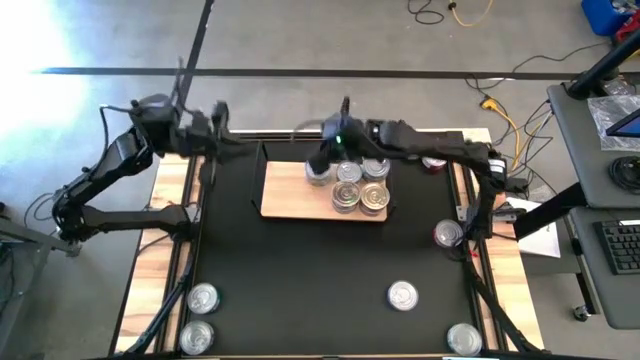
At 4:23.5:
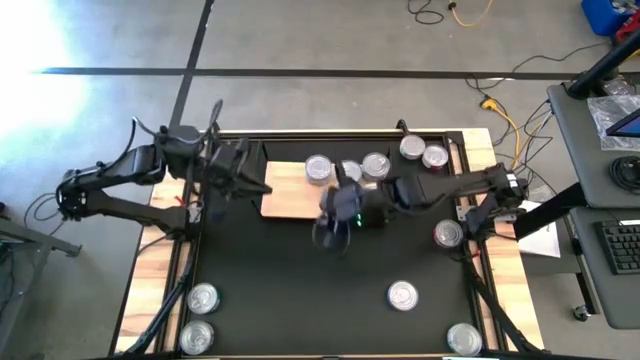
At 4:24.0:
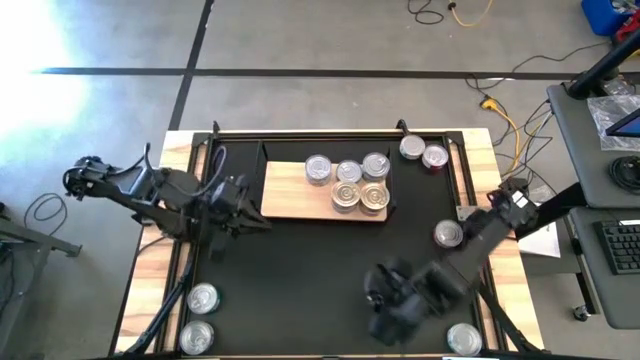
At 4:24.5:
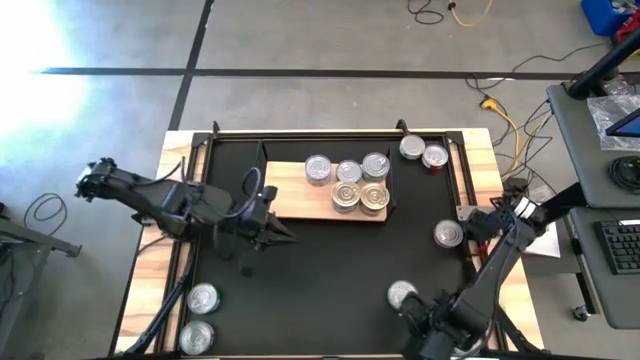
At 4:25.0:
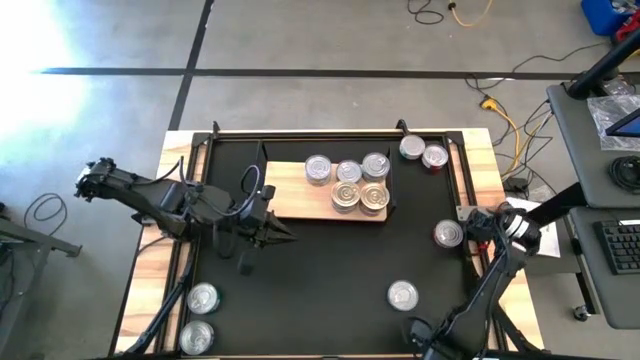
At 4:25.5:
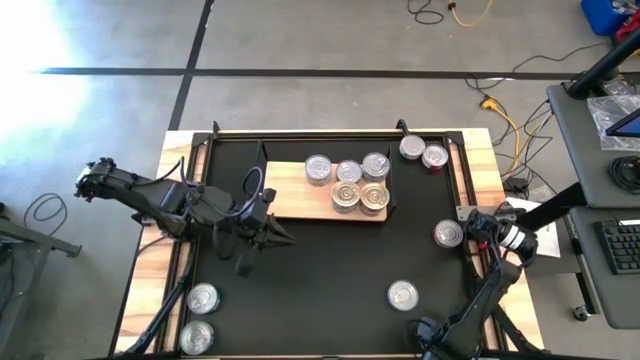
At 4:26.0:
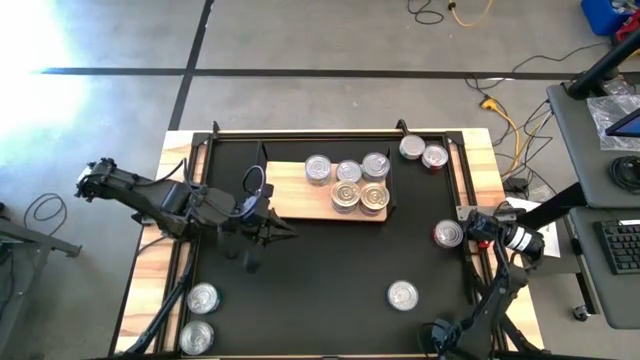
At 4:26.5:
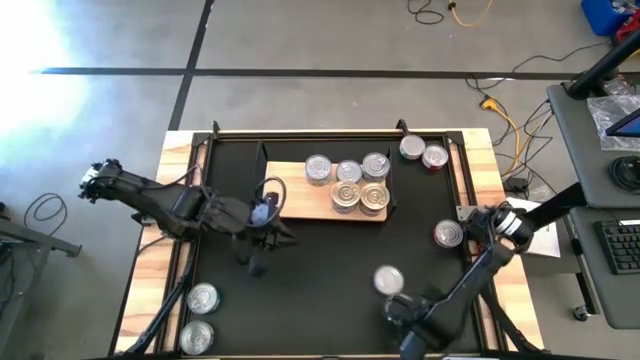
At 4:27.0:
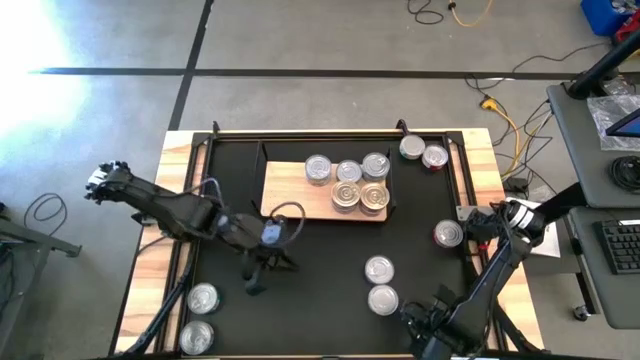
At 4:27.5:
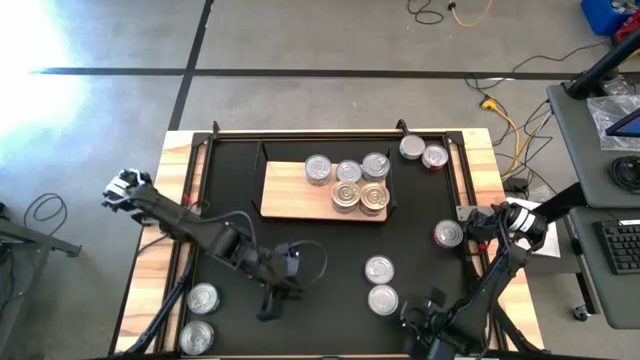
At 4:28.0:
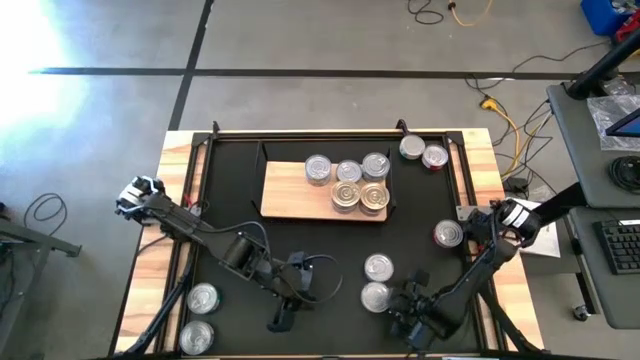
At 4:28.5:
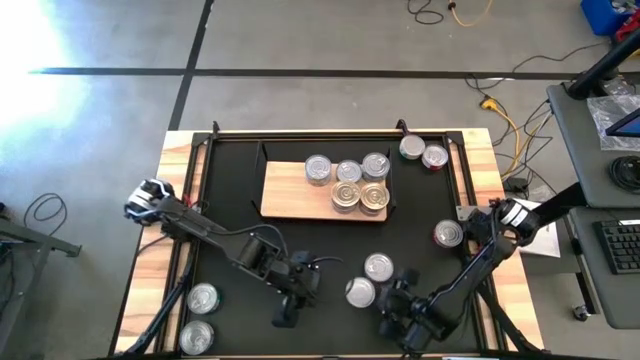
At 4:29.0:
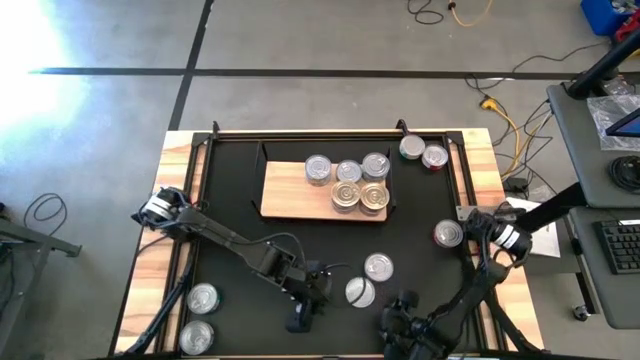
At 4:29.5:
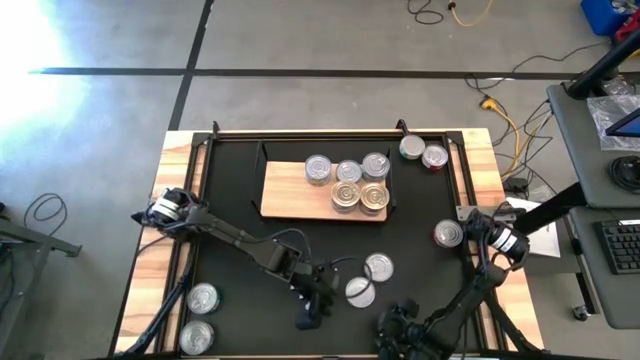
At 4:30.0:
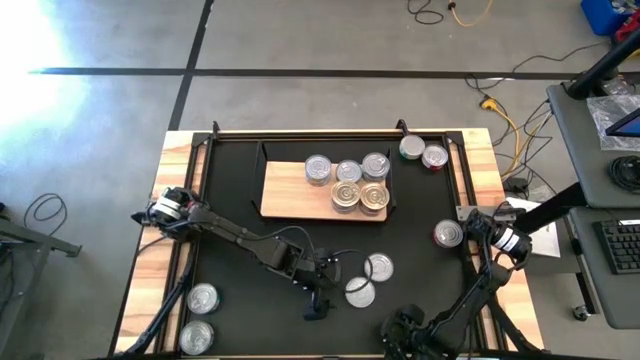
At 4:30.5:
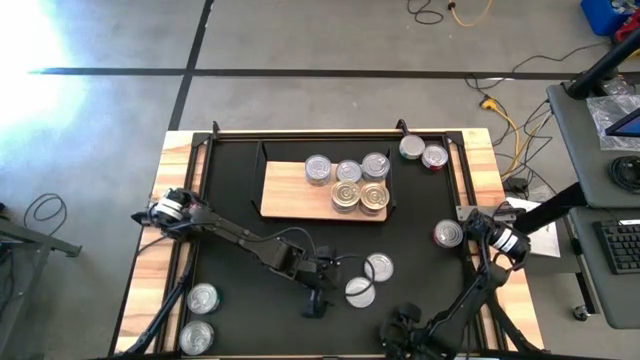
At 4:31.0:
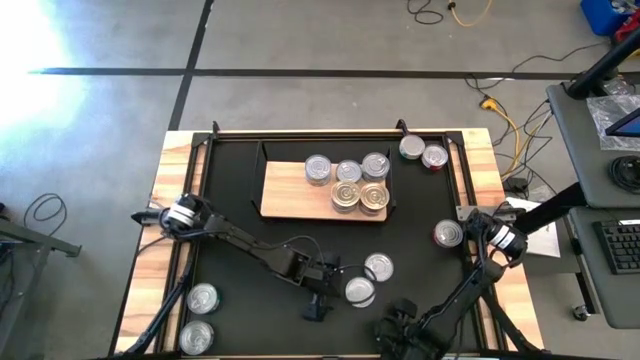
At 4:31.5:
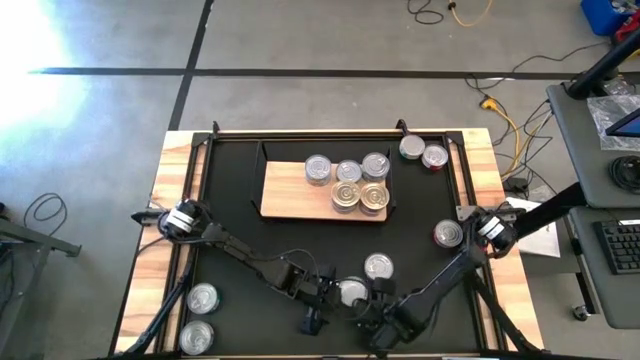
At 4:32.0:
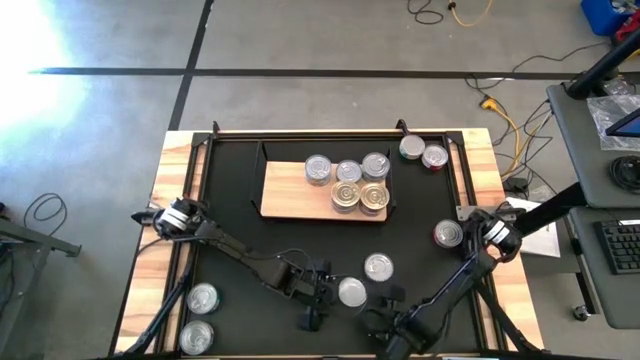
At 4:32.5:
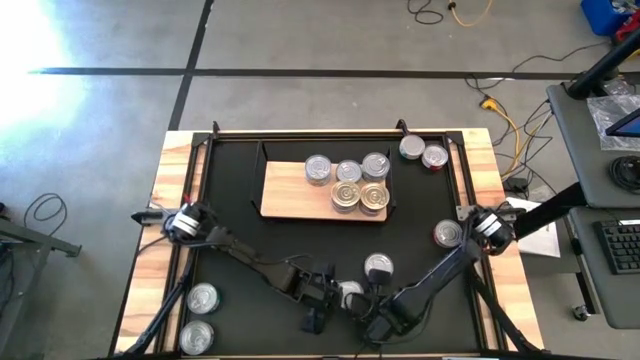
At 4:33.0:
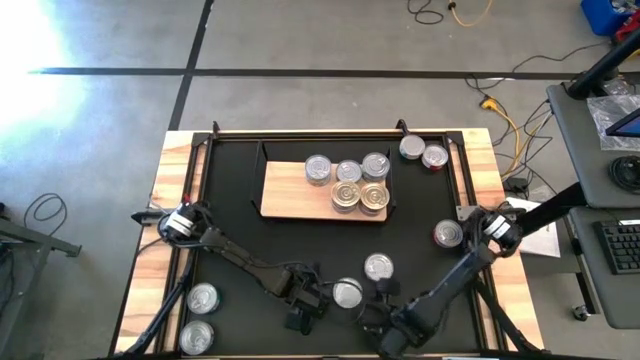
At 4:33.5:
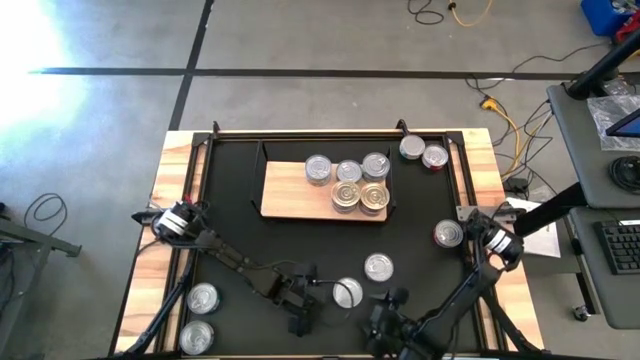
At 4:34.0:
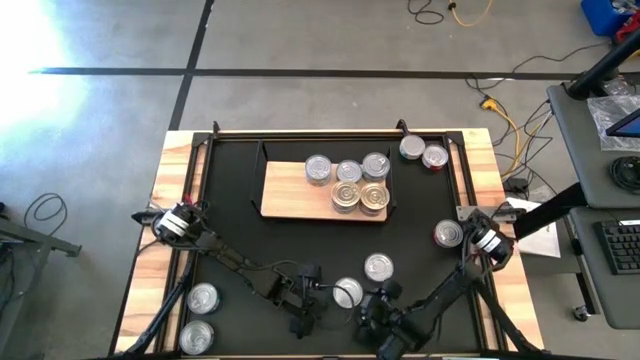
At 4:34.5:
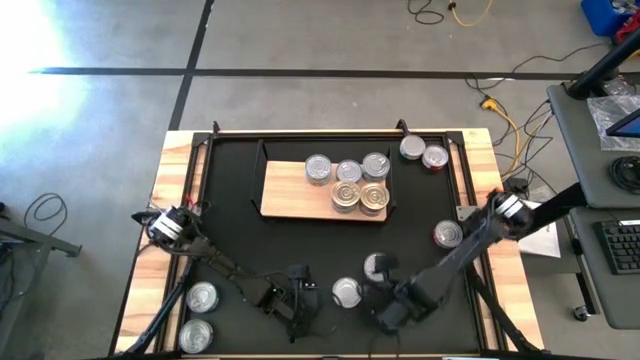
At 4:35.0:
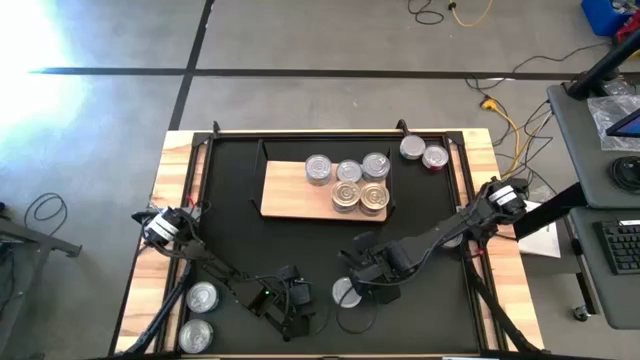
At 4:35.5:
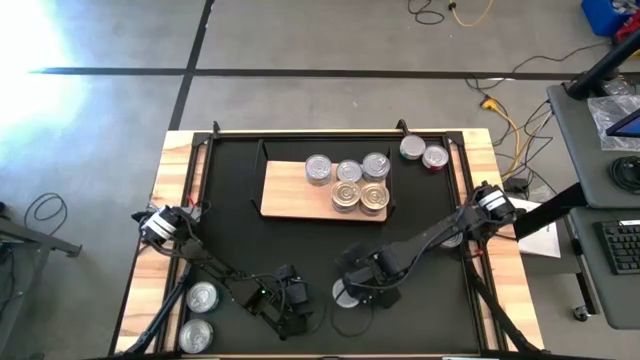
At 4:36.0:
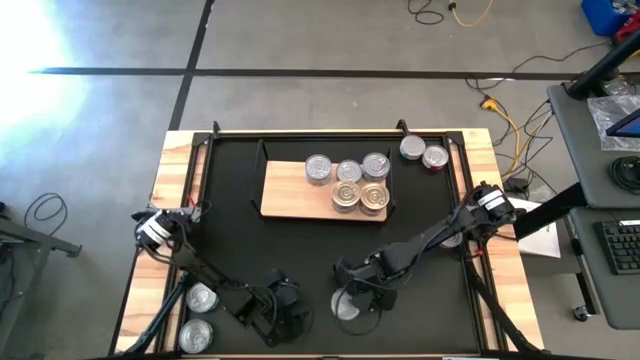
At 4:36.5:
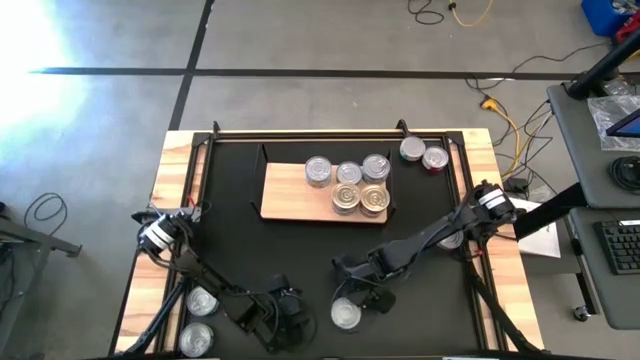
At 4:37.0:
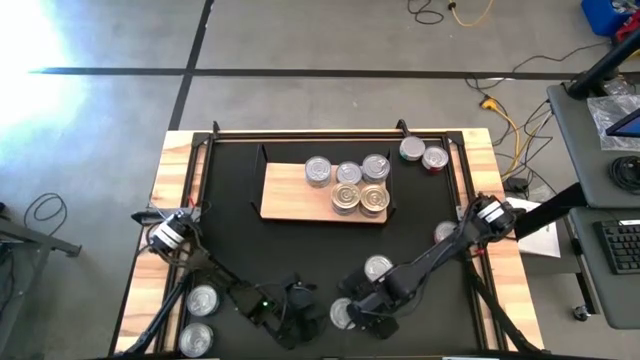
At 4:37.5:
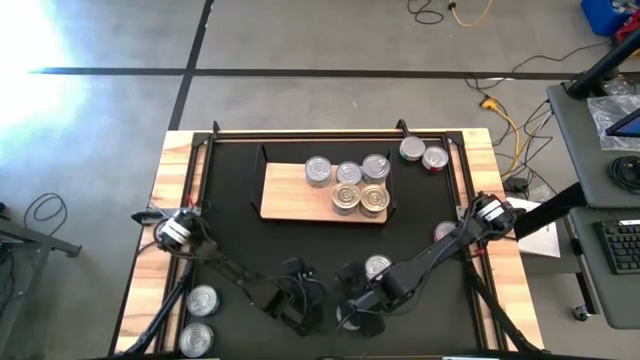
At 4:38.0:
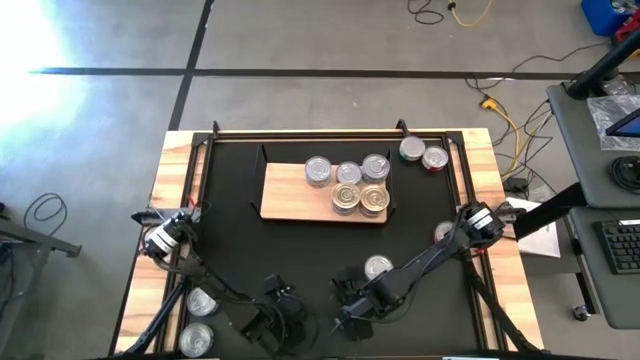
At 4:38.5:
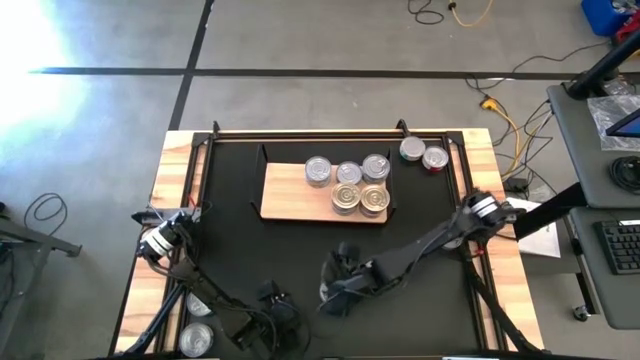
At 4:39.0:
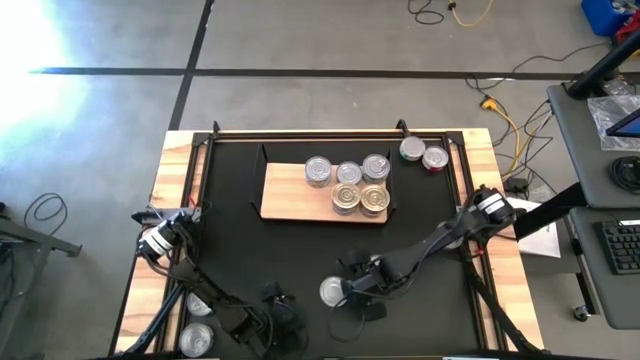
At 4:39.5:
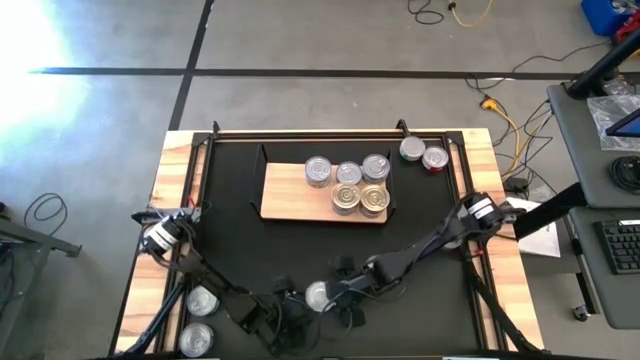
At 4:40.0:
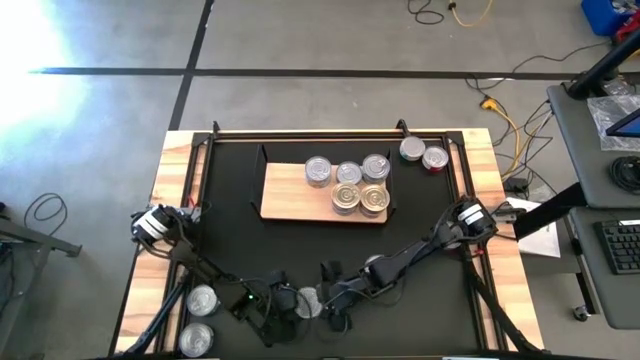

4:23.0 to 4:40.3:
Task: Stack canned seafood by type on shelf
Put the bottom right green and white tuna can on the shelf

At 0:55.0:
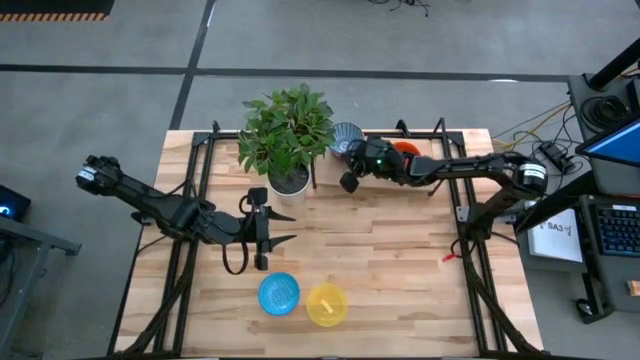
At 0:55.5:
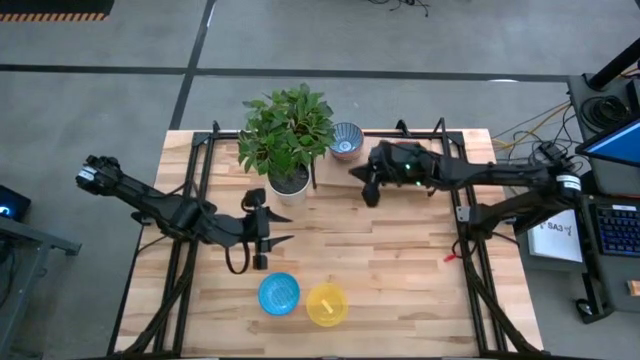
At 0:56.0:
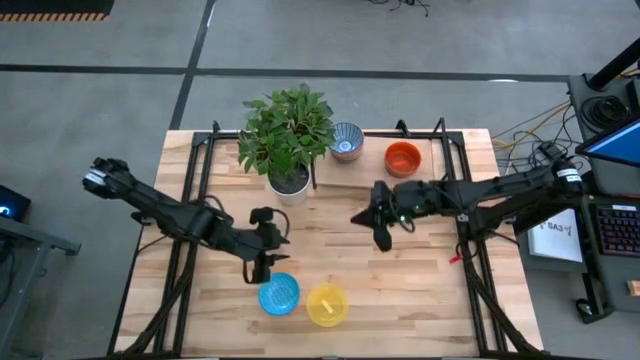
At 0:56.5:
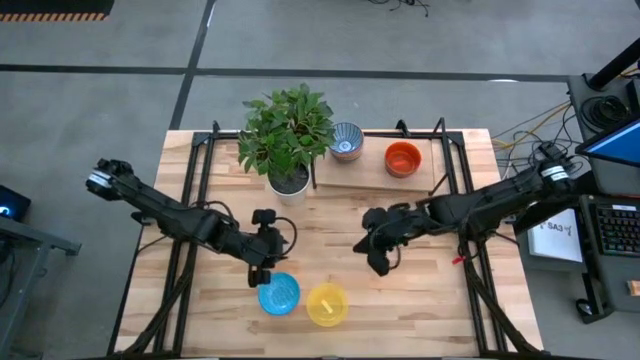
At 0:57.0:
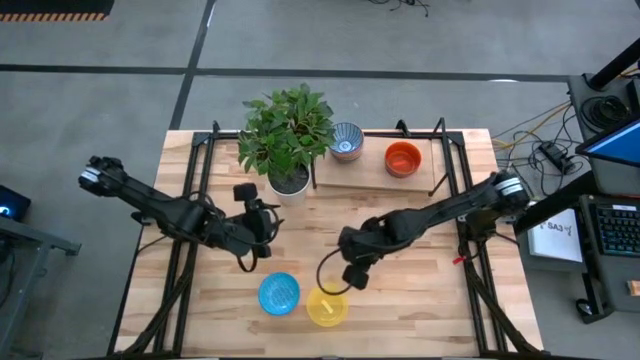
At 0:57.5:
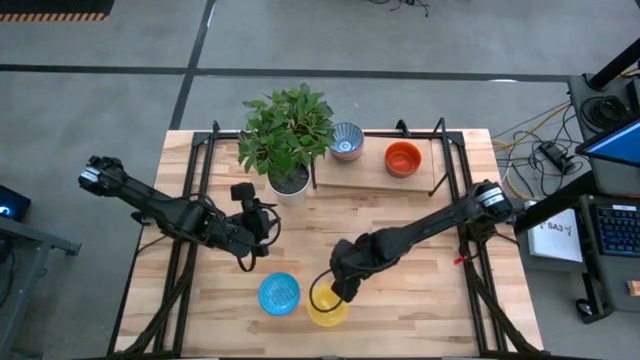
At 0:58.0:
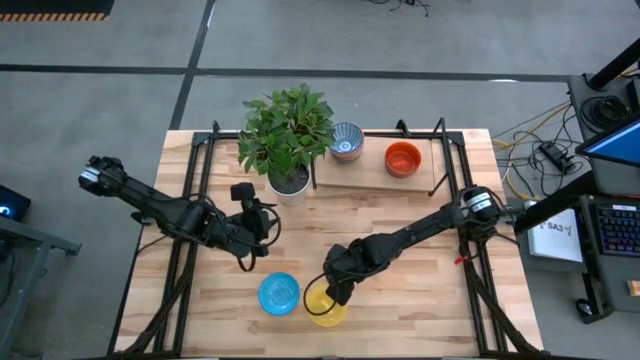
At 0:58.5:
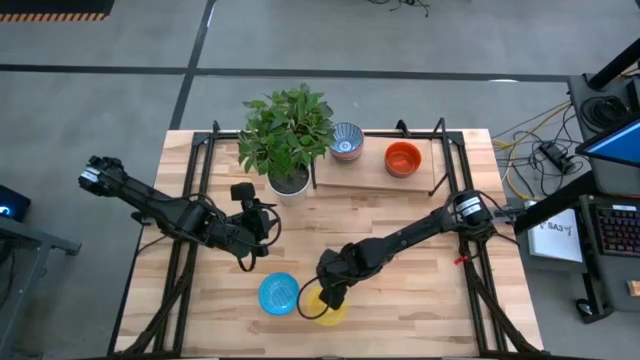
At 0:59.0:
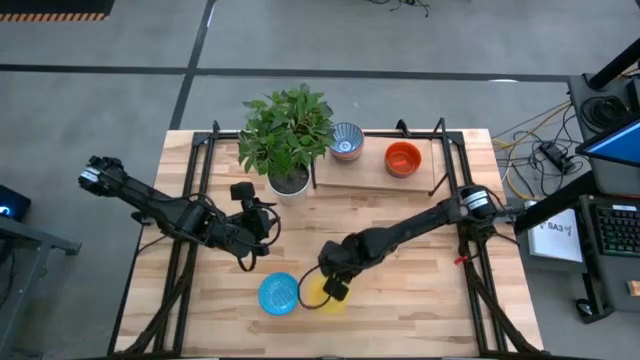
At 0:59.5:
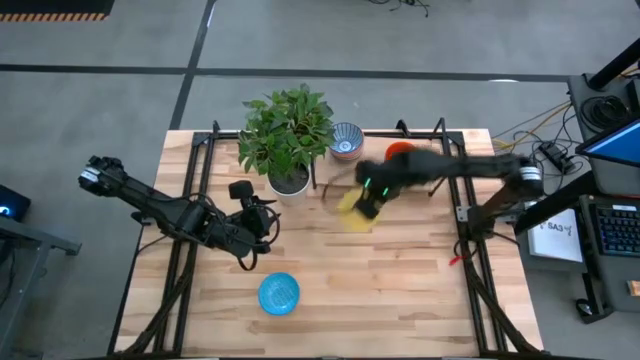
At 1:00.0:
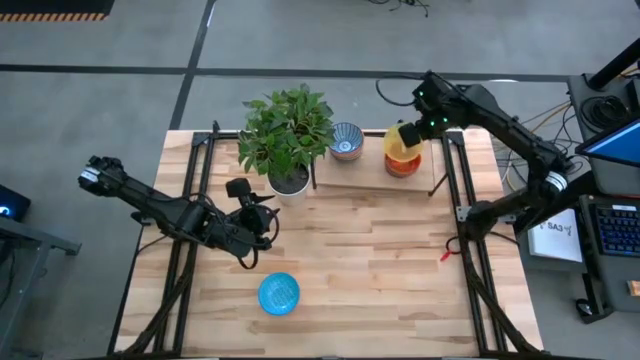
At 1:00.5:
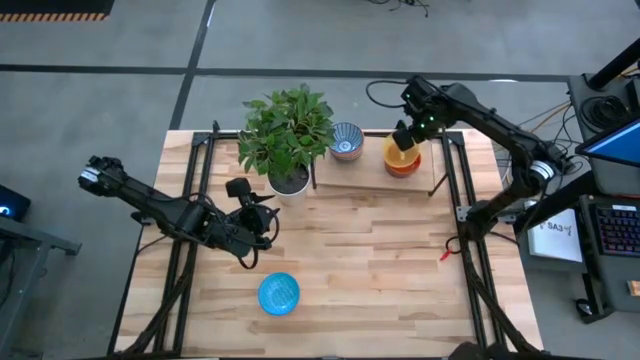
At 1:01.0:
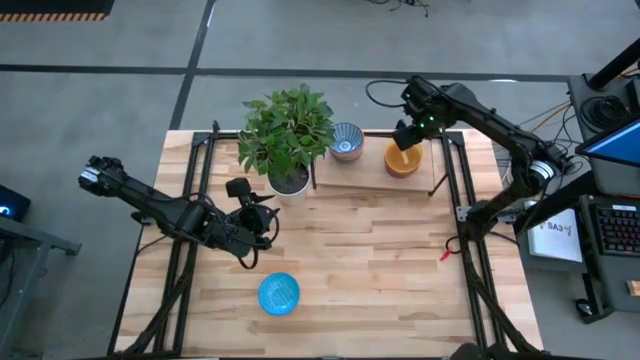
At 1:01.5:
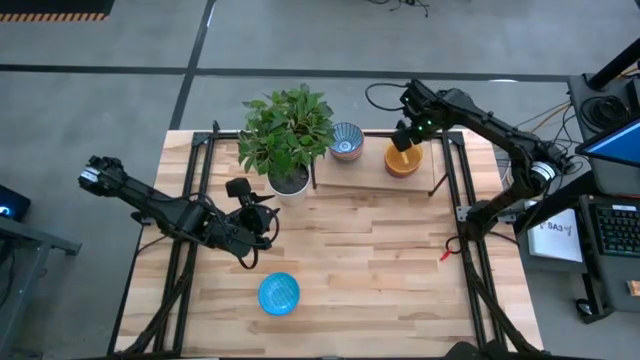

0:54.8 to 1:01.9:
Task: Place and stack bowls onto a shelf
Stack the yellow bowl on the orange bowl on the shelf
